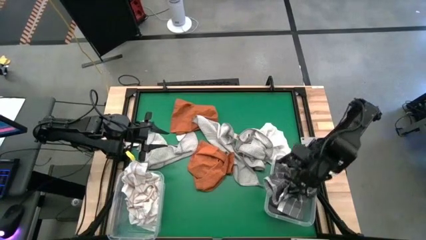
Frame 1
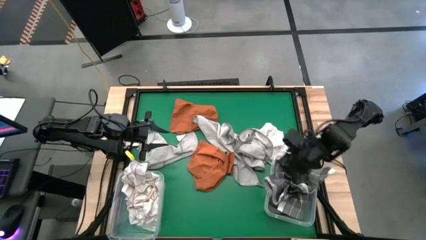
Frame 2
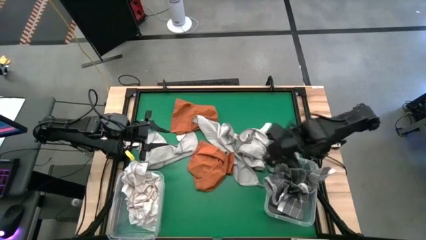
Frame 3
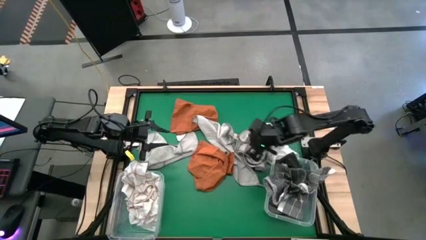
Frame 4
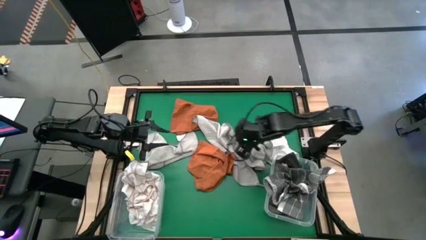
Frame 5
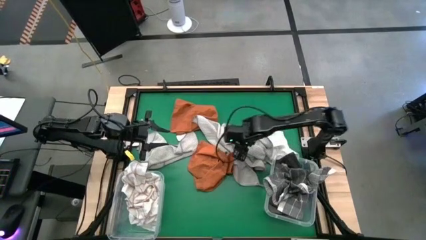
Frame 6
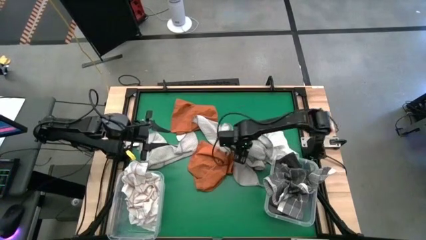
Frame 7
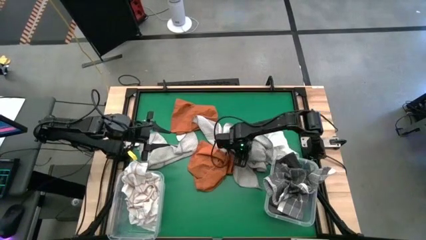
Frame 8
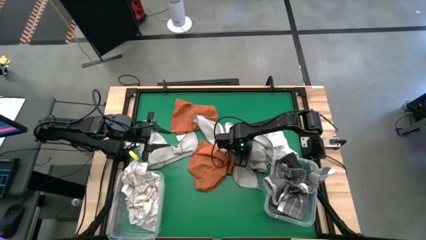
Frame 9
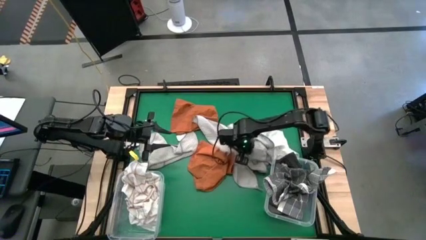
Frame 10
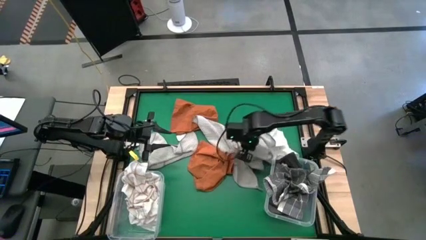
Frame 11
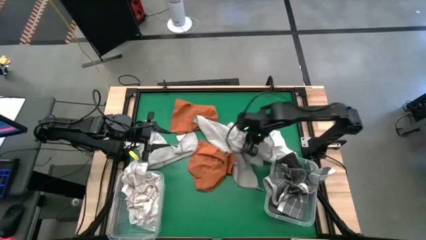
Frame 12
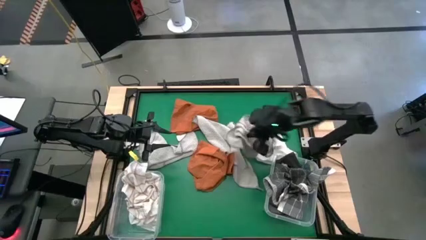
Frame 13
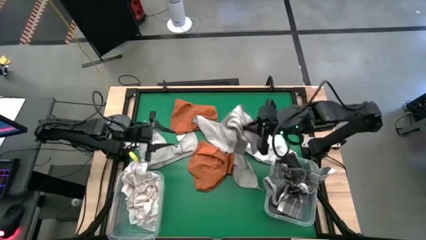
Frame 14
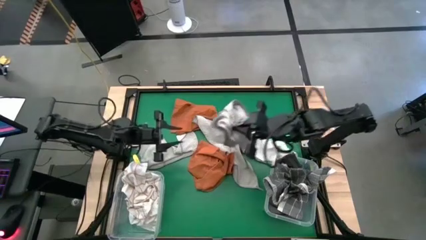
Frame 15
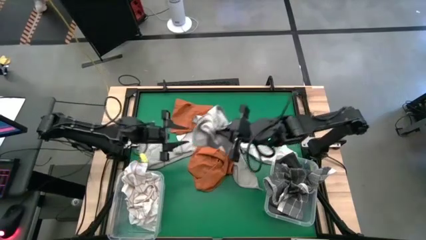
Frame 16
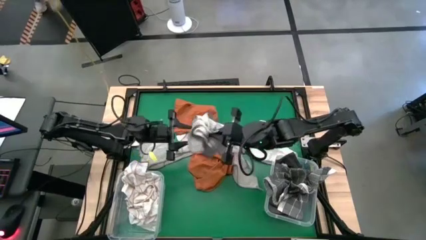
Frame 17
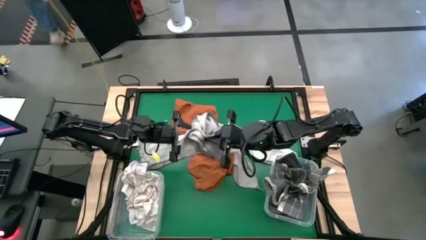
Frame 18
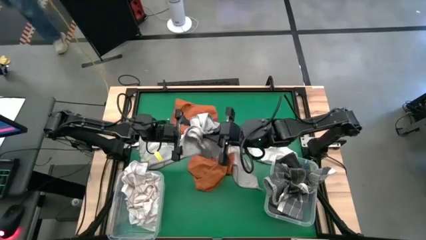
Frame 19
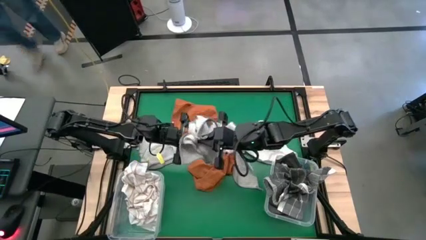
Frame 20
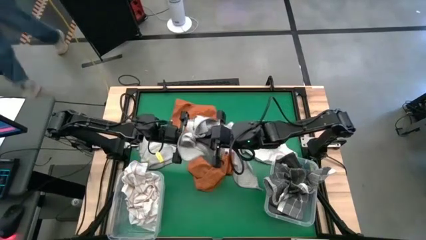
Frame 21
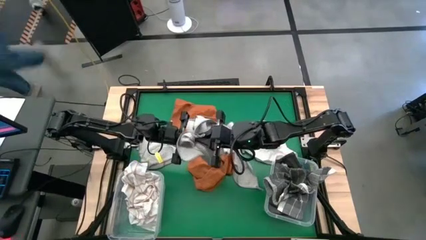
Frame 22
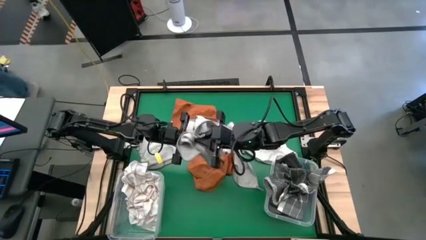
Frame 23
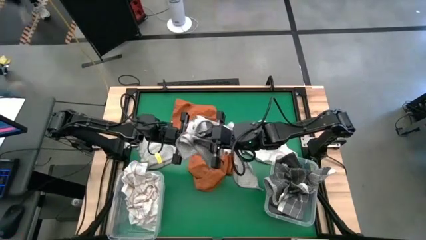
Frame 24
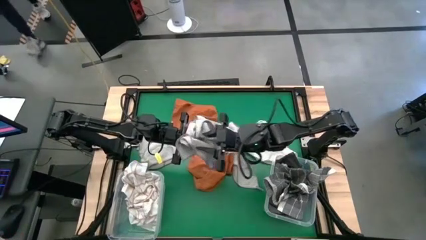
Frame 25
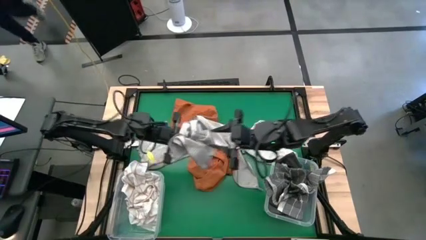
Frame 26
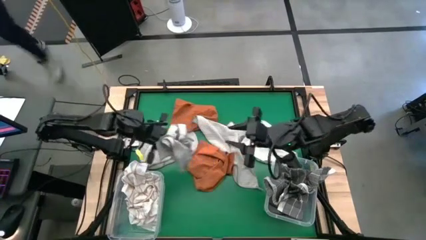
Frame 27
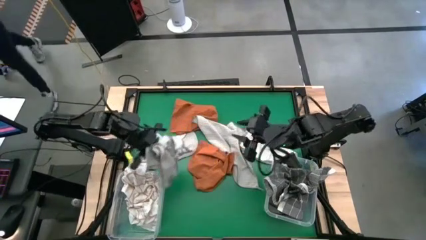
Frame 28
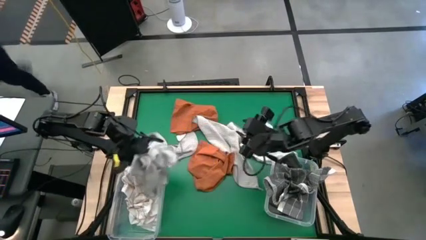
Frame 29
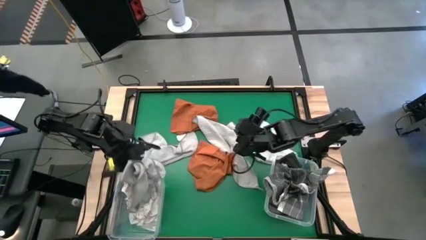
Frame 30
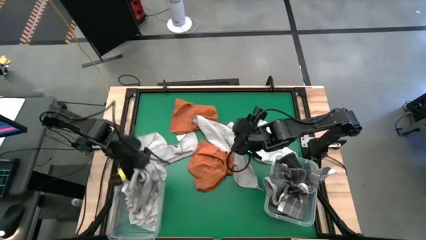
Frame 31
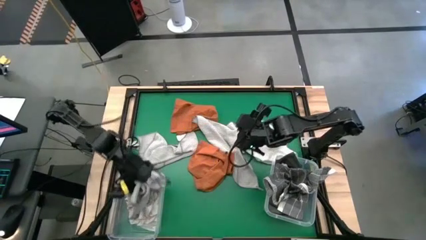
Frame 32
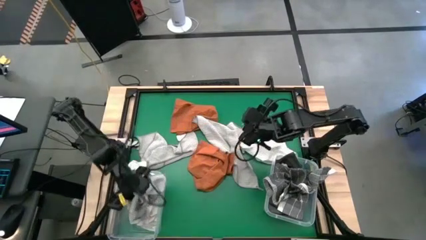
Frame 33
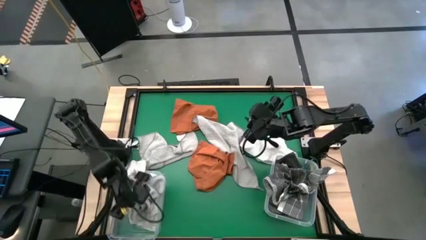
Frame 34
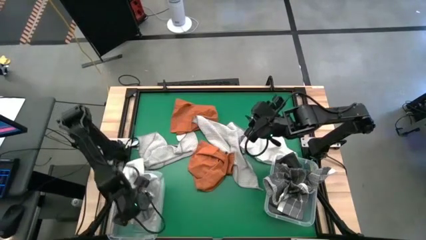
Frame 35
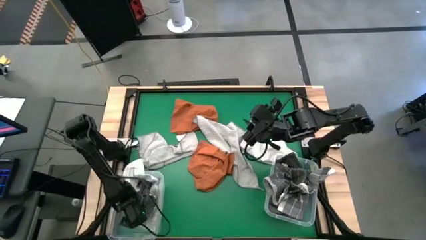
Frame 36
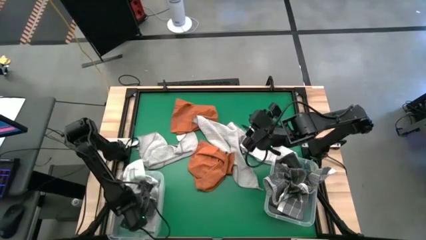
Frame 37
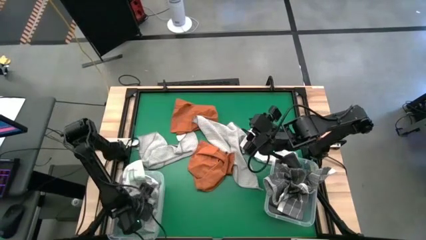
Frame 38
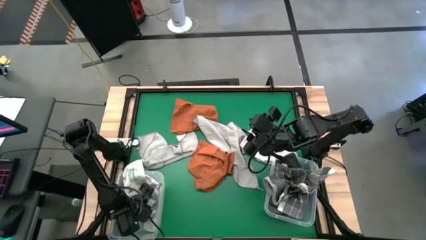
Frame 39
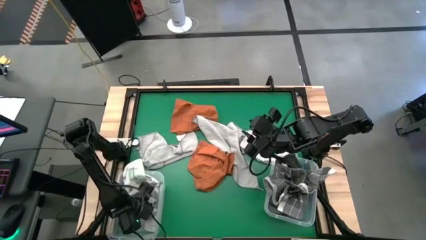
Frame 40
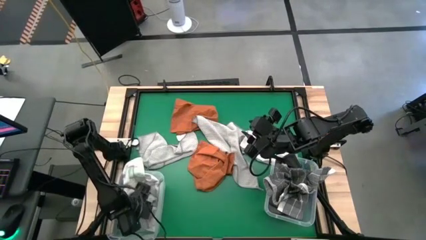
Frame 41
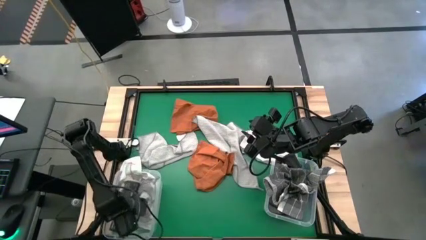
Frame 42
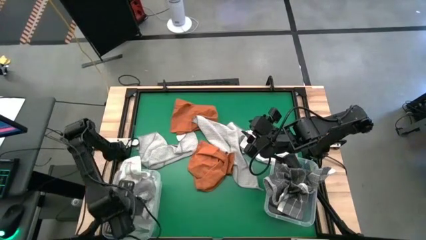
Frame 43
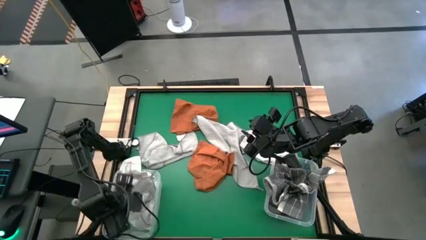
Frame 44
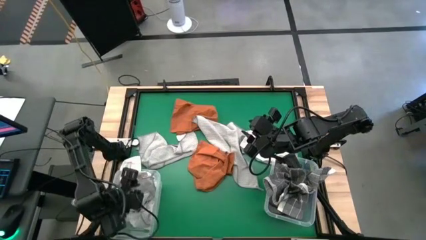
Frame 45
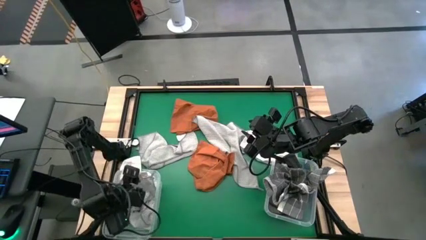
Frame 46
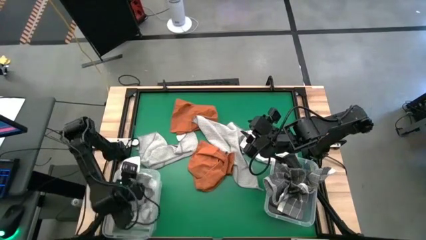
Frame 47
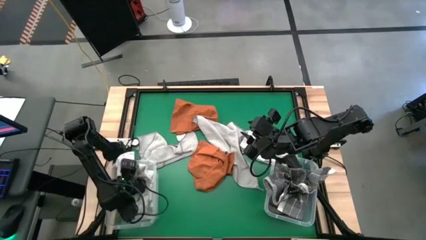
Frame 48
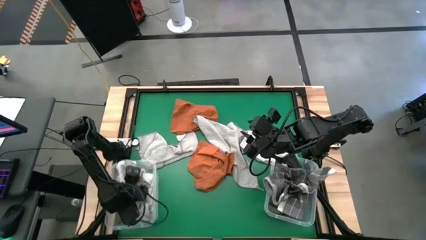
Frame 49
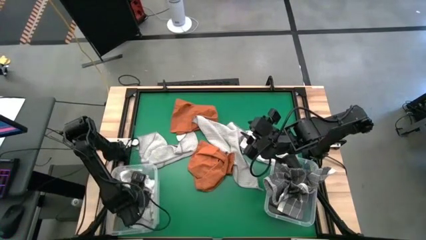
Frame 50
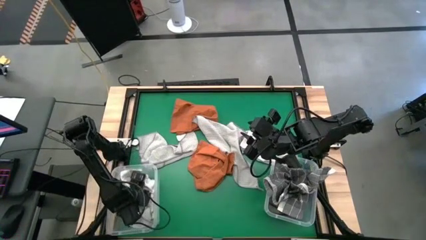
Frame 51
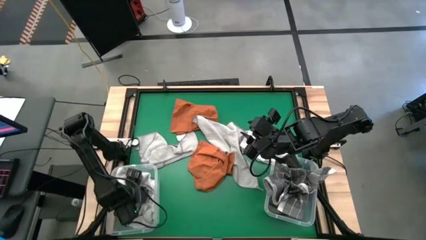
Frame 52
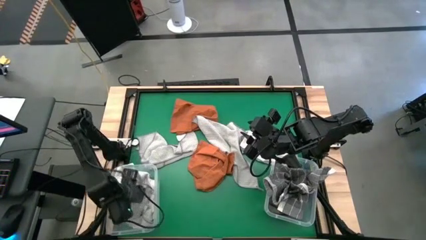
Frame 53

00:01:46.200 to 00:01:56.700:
Task: Sort towels by color in basket
Put the gray towel into the left transparent bin

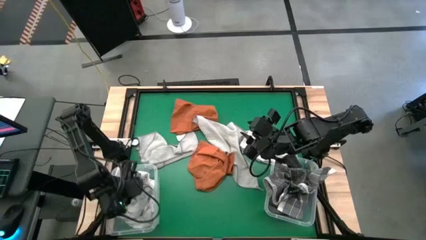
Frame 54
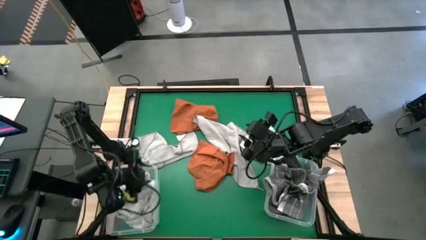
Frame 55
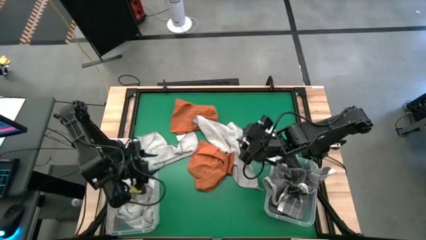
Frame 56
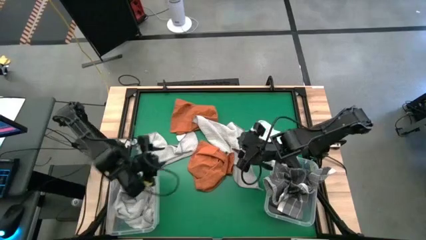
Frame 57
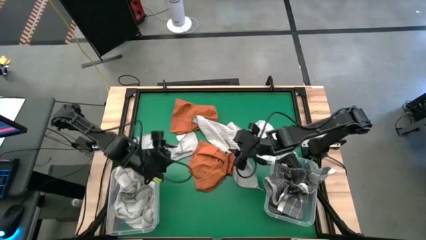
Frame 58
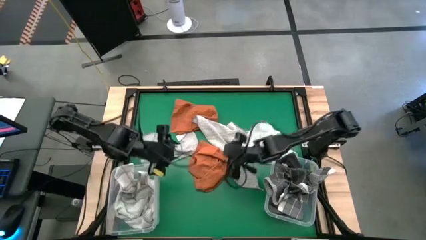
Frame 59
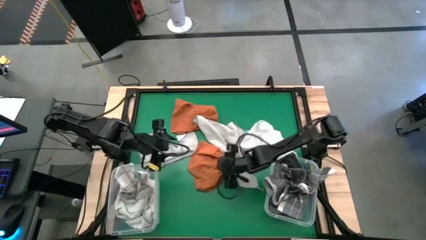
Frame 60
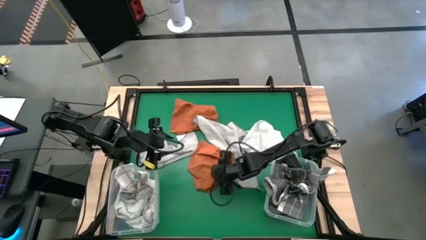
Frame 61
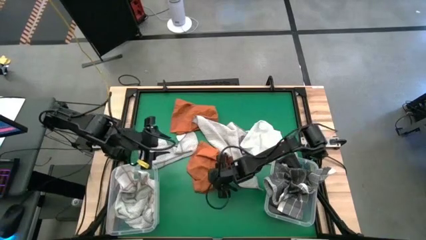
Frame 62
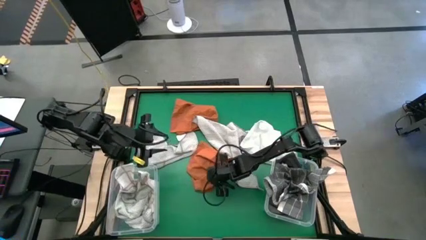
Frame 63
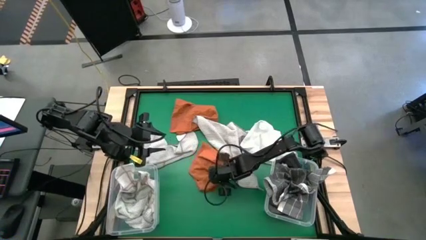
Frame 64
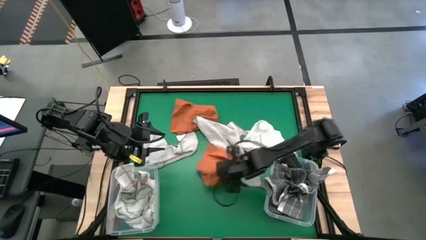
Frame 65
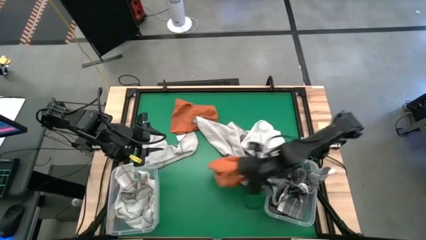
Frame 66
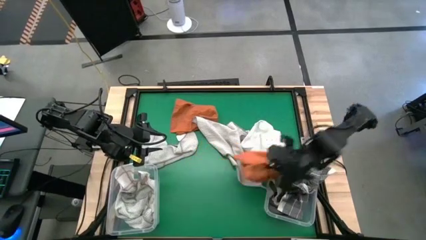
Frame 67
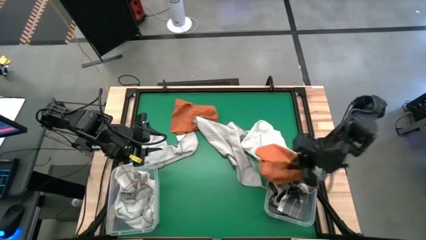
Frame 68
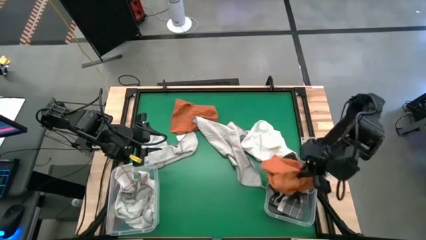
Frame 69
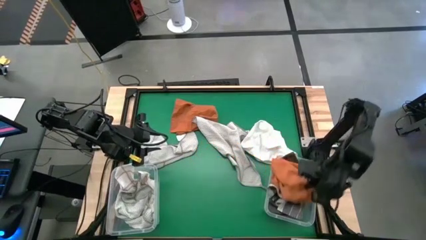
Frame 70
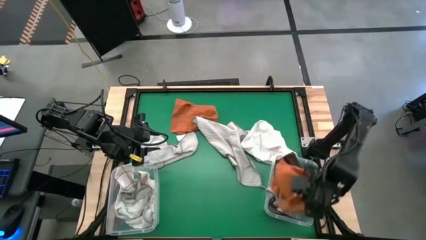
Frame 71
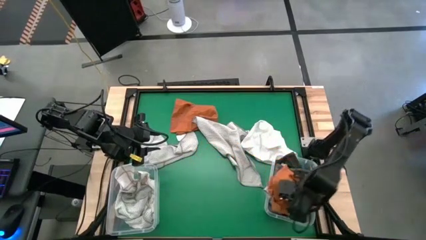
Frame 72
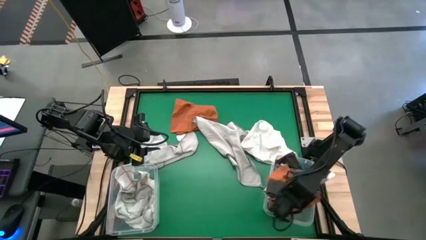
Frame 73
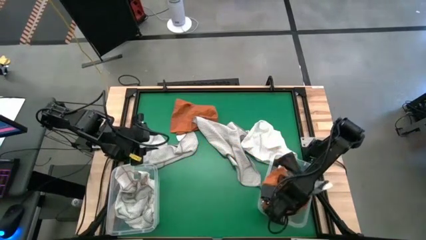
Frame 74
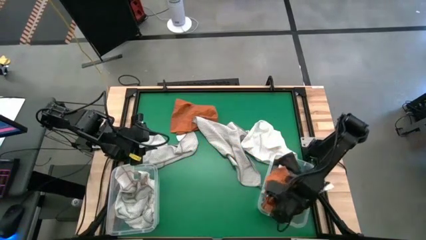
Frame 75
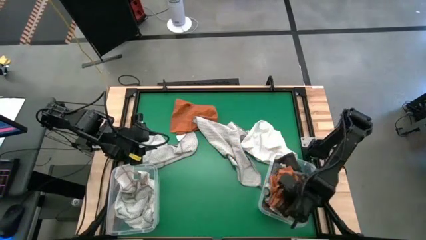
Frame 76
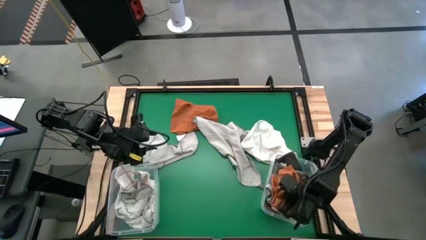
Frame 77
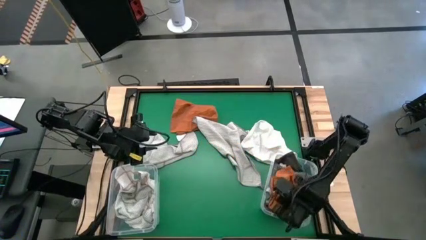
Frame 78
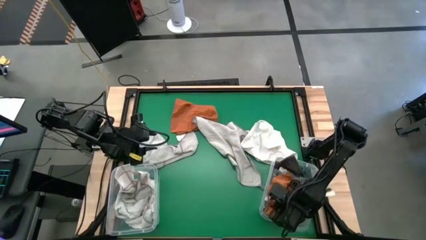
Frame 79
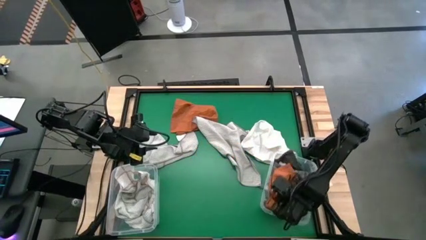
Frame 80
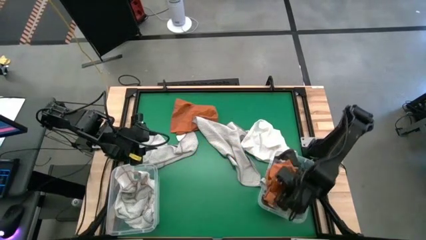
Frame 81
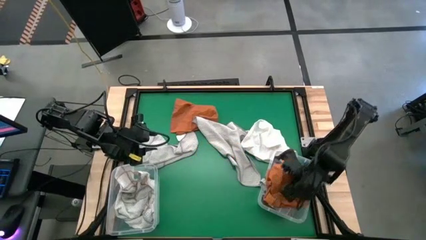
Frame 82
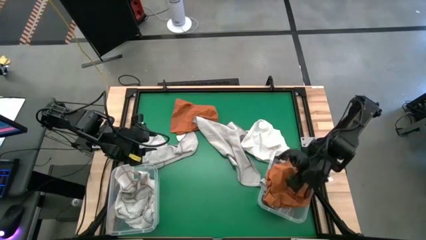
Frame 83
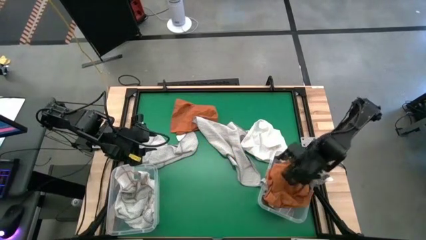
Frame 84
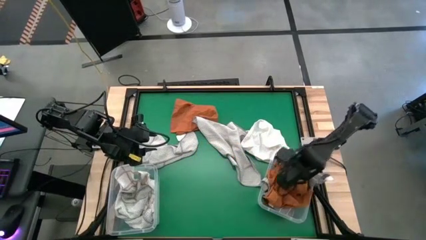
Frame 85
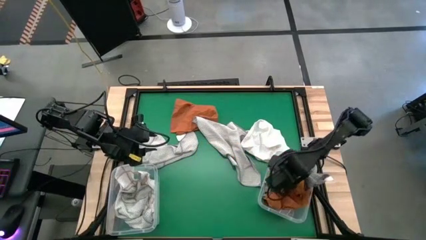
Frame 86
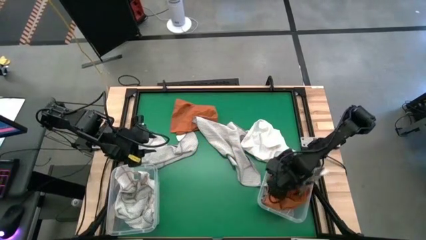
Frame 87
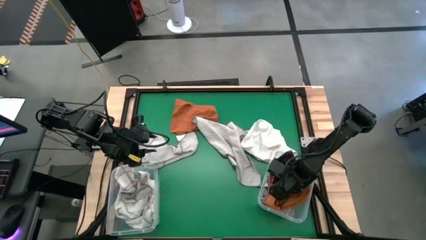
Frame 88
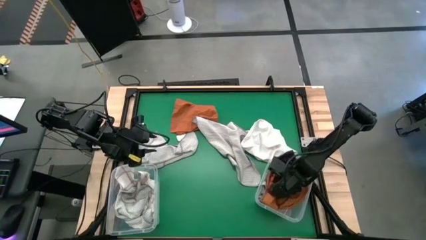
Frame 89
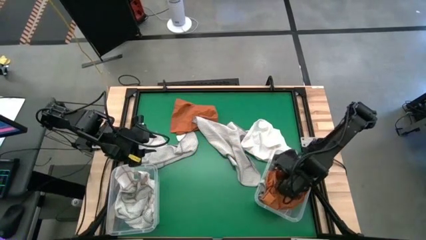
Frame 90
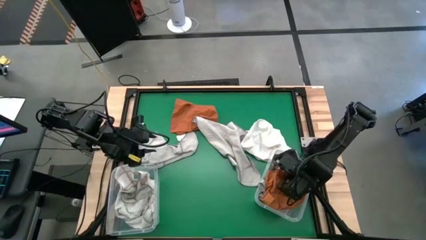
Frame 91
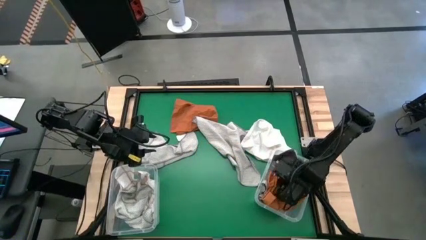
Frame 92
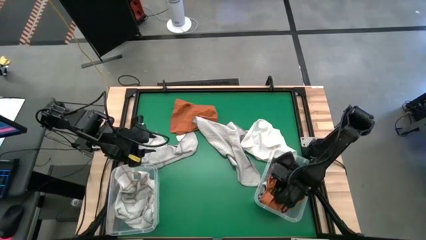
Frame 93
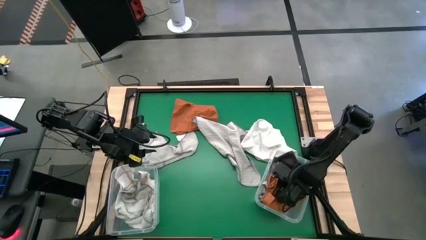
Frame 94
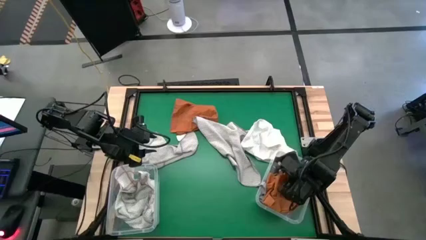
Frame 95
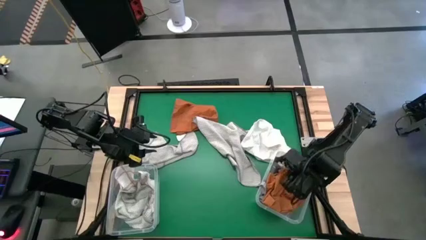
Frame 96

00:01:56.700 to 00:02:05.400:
Put the brown towel into the right transparent bin
